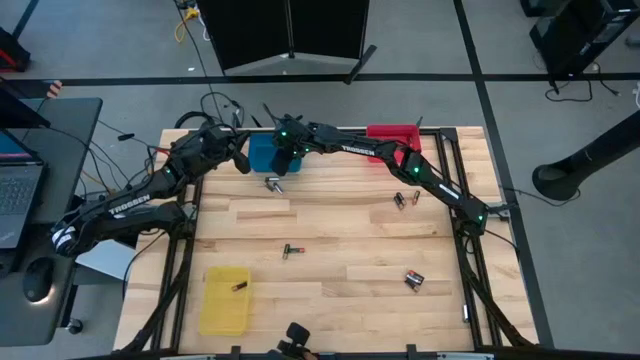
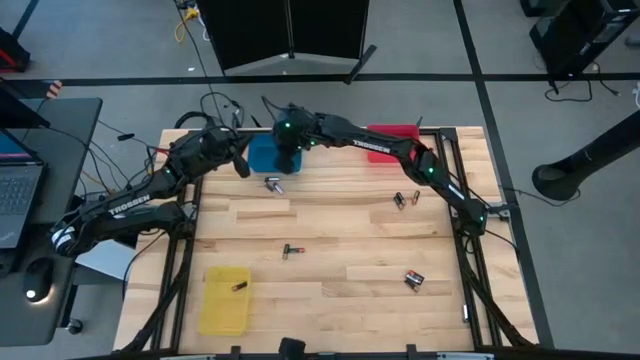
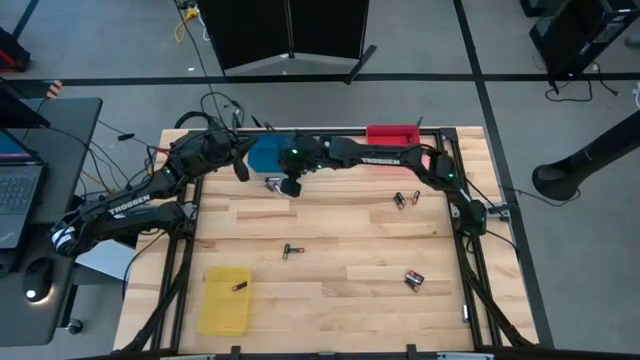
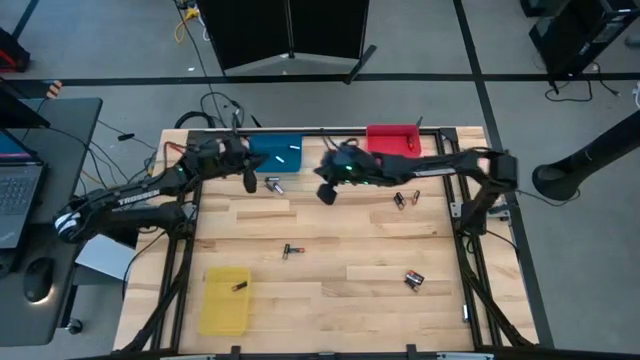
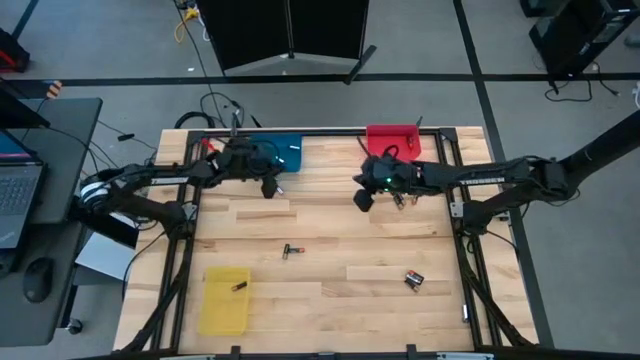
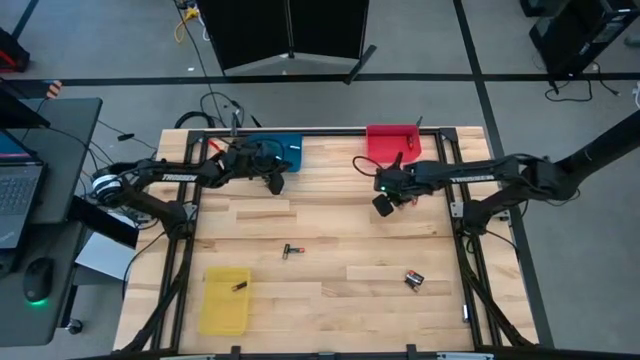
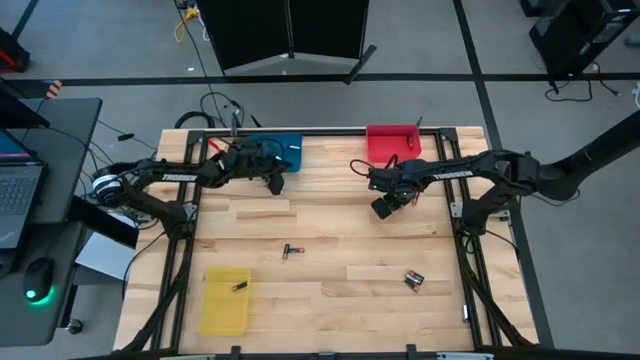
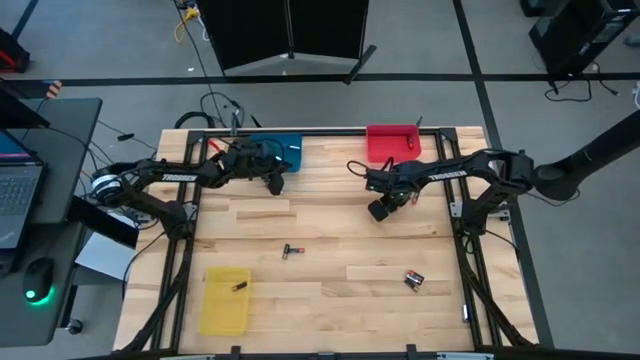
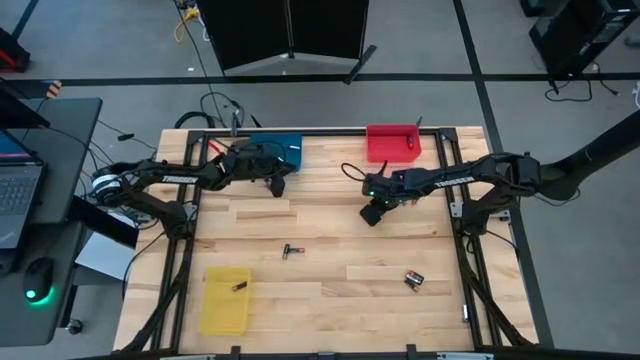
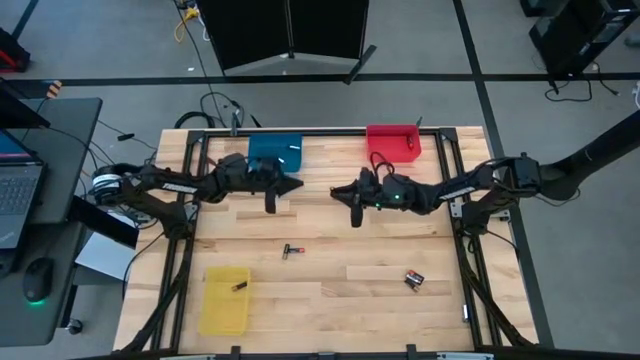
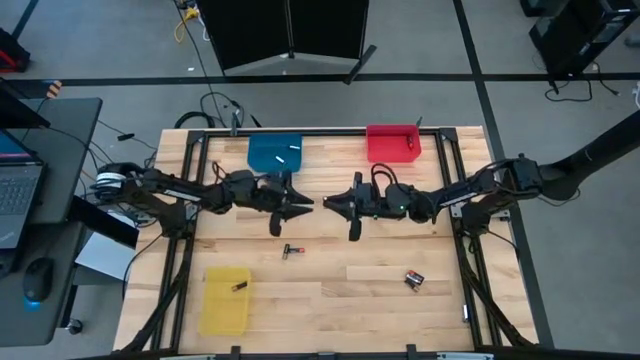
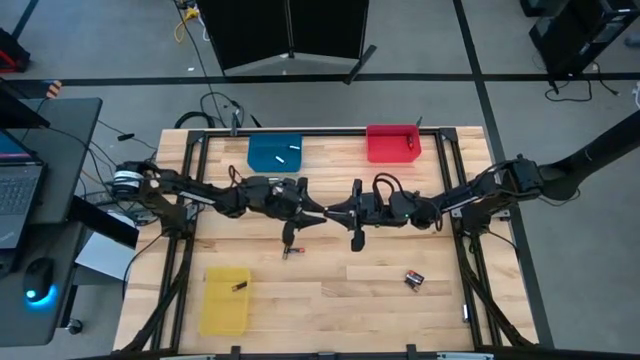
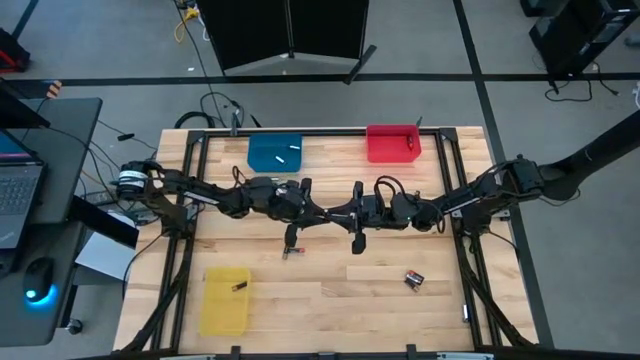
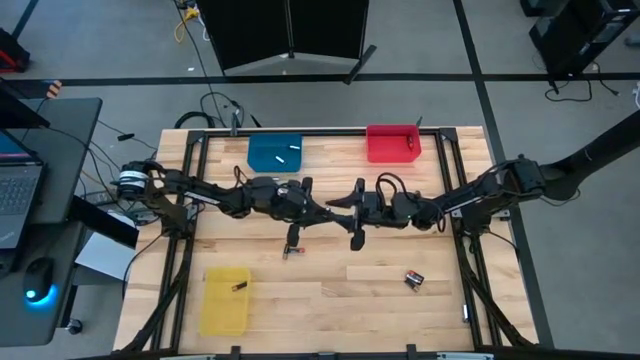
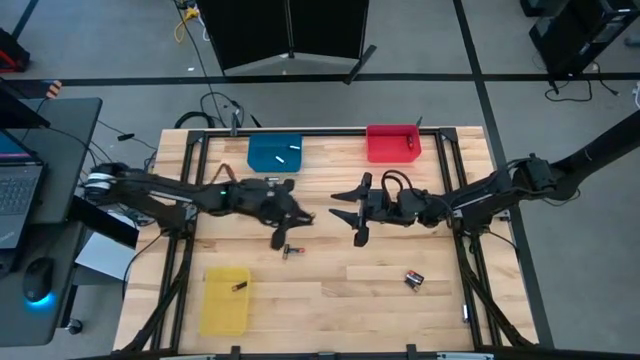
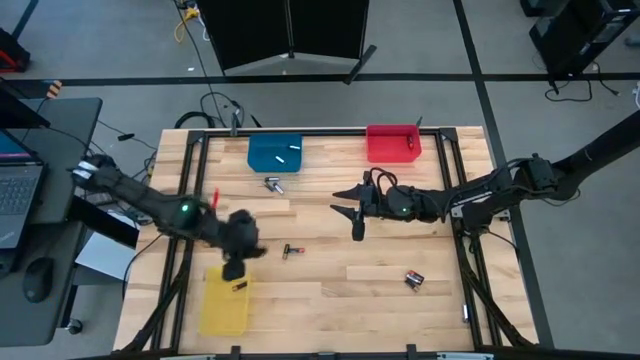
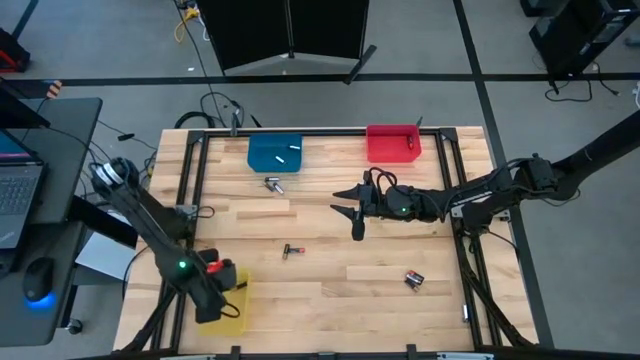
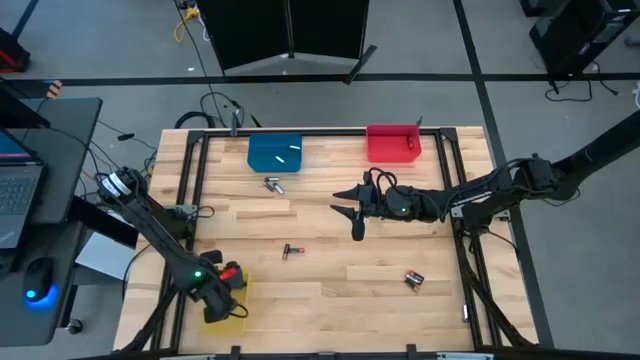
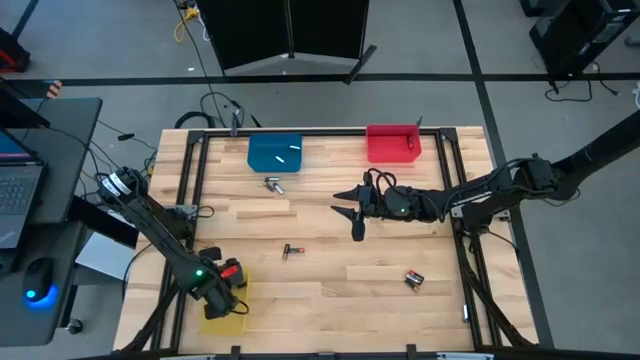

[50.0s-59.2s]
Task: Sort batteries
Put the black-brown battery into the yellow bin

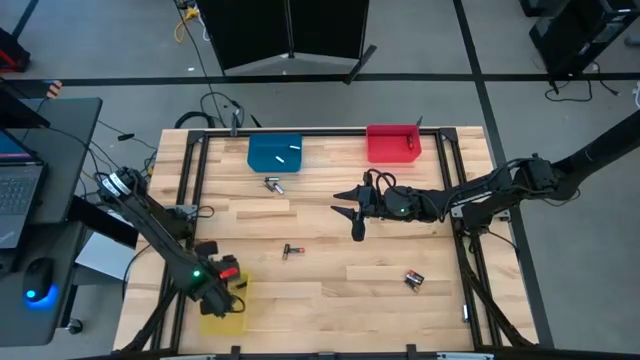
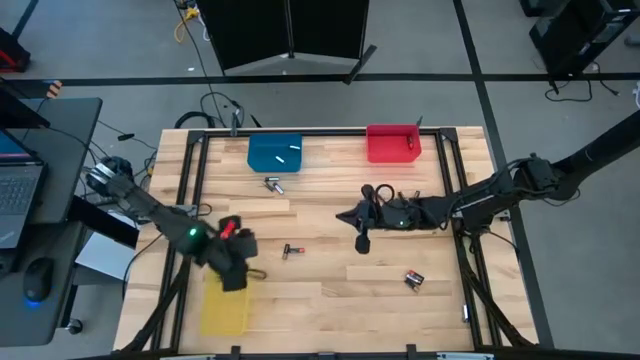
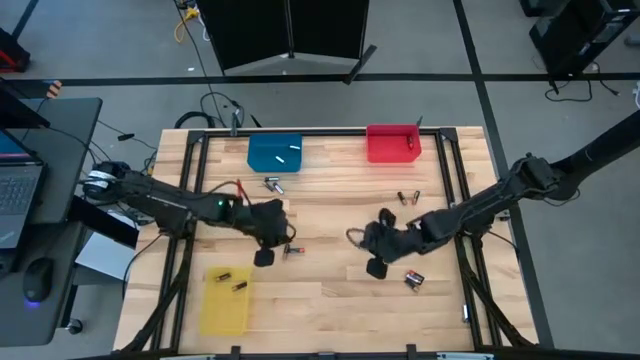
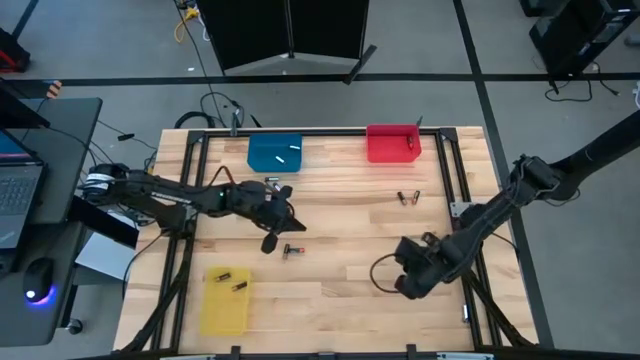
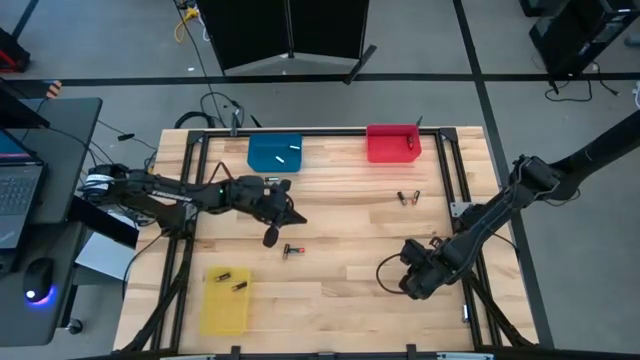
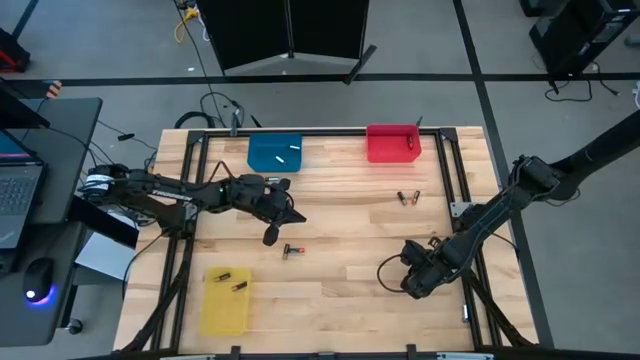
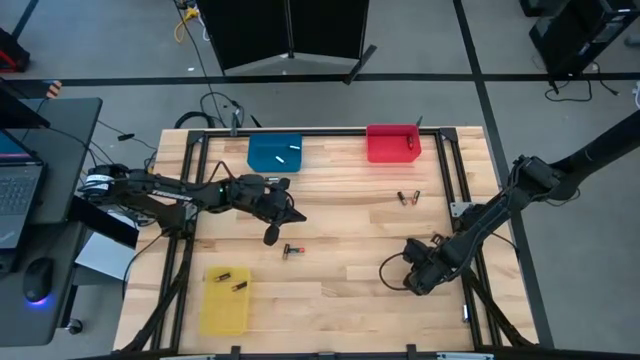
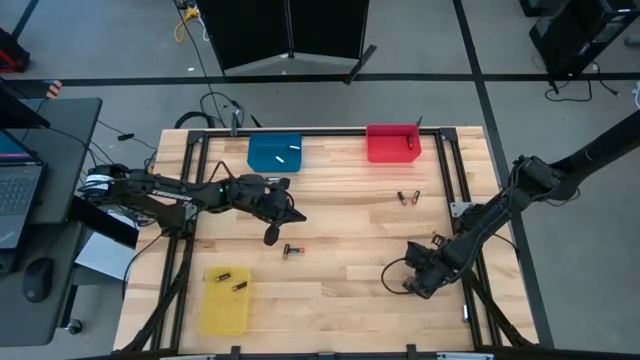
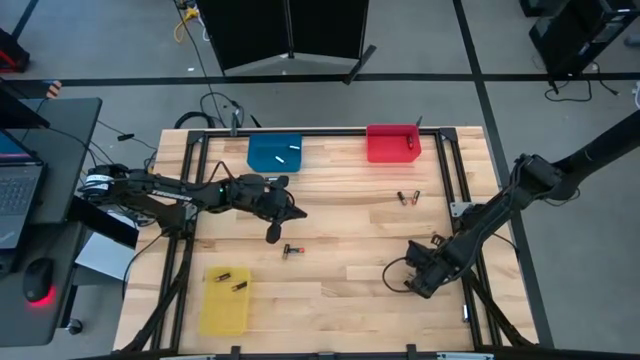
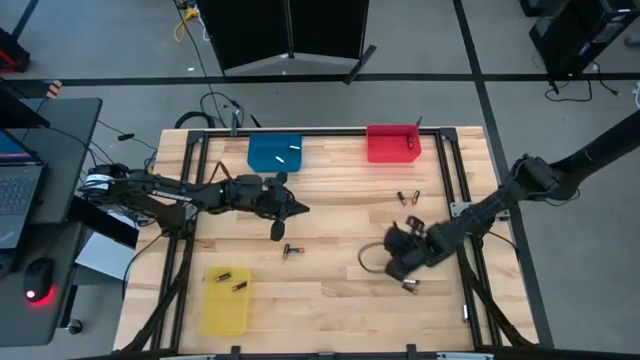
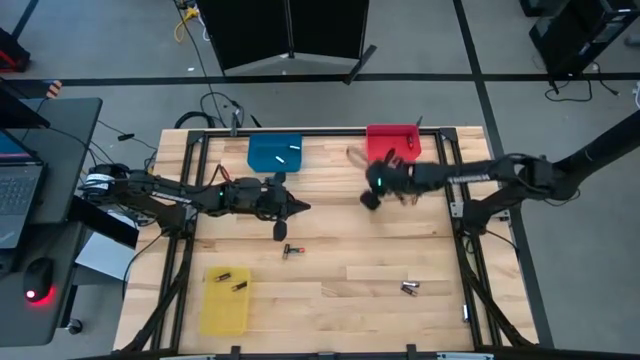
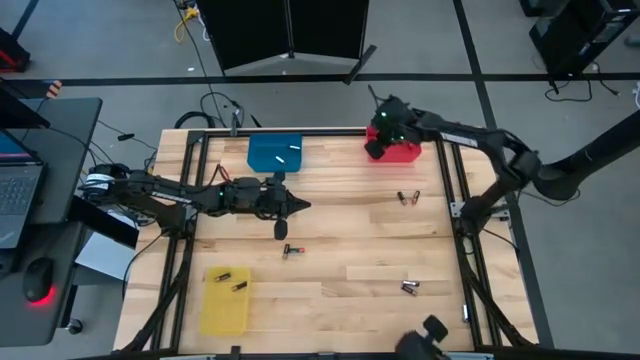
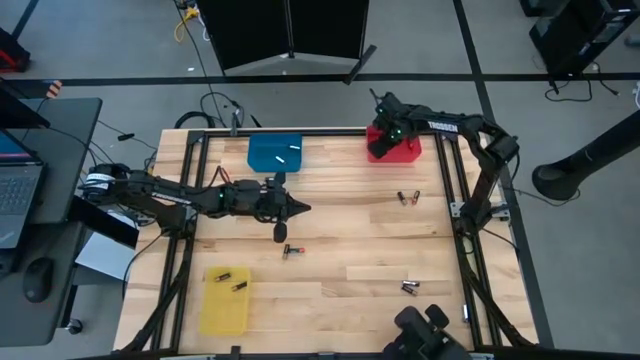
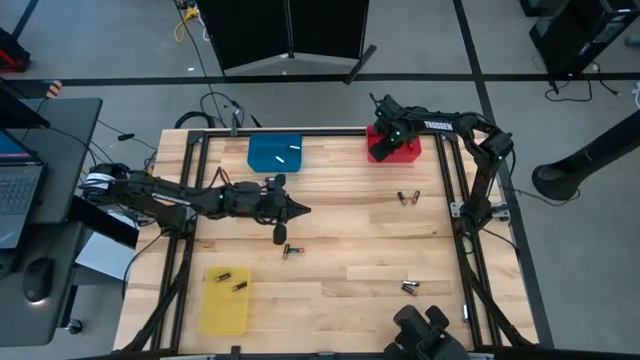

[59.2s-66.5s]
Put the black-red battery into the red bin

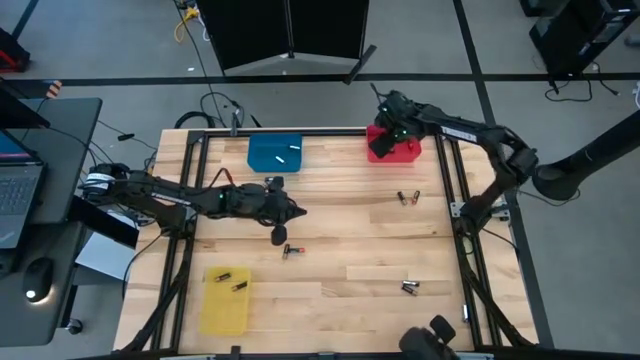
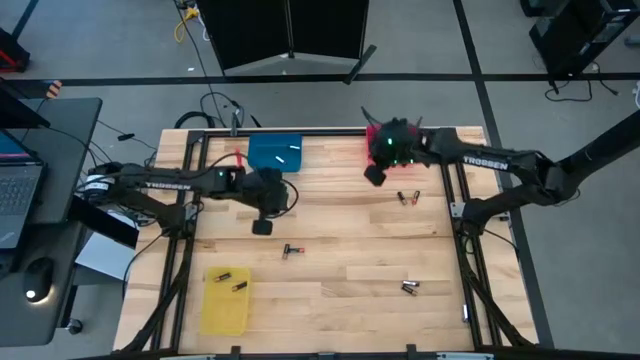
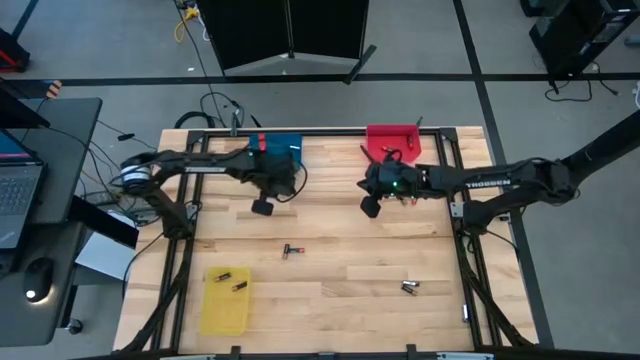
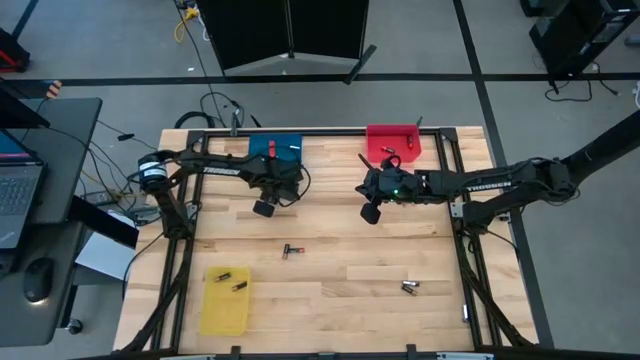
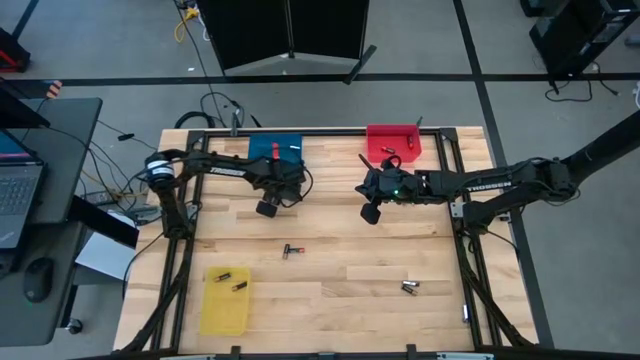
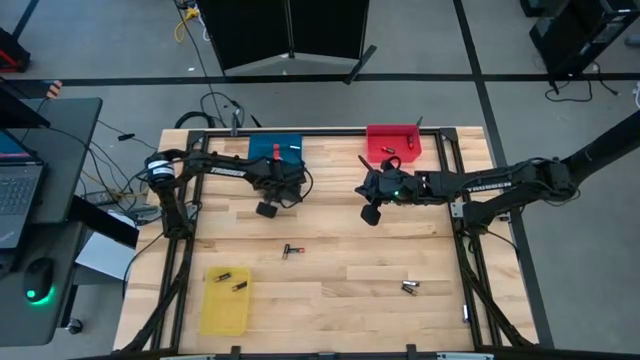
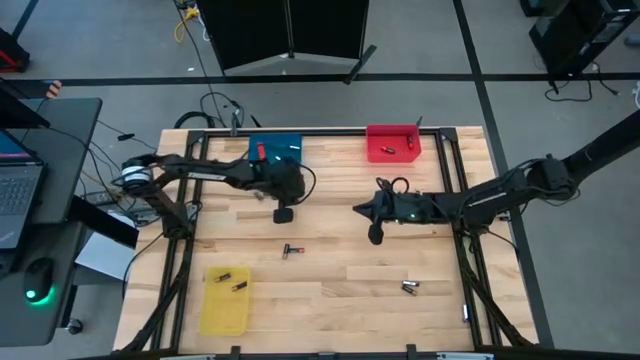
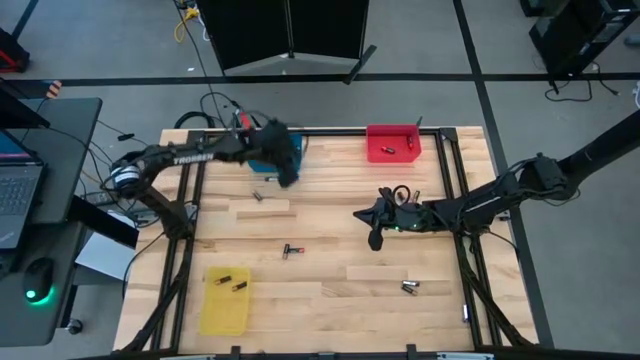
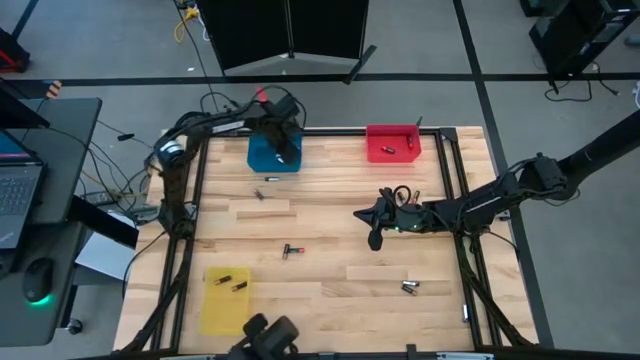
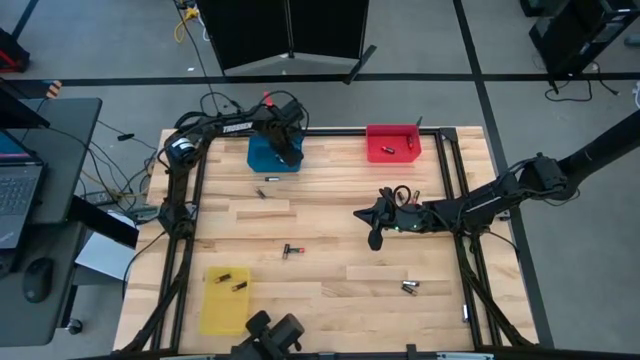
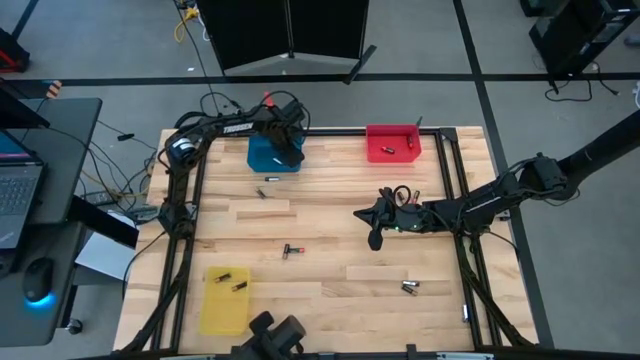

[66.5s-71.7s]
Put the silver battery into the blue bin
